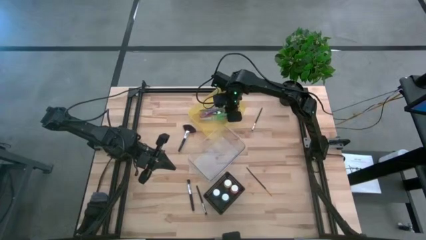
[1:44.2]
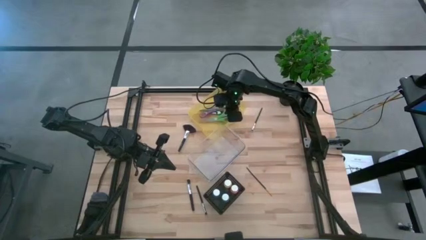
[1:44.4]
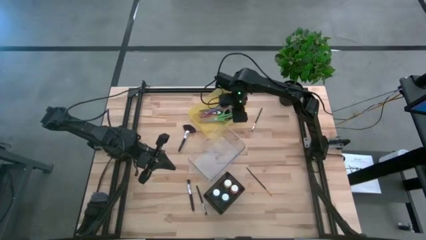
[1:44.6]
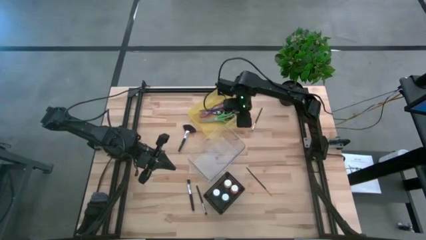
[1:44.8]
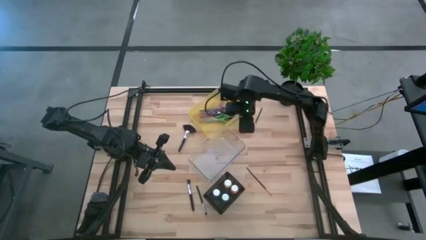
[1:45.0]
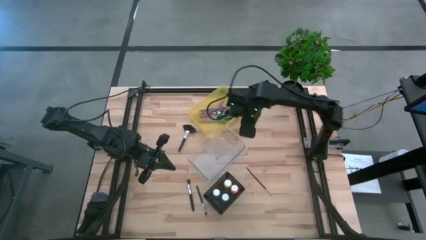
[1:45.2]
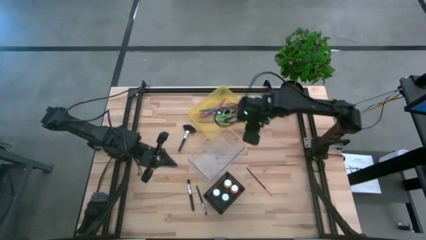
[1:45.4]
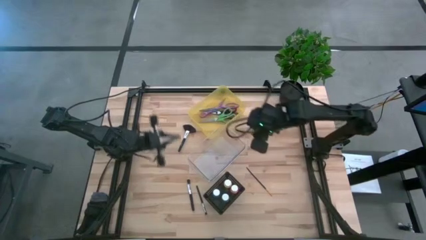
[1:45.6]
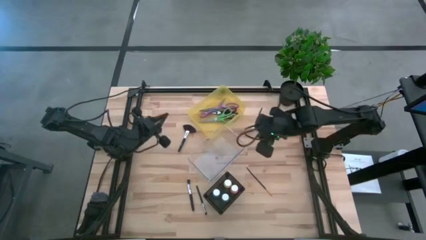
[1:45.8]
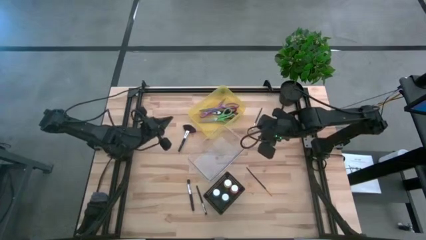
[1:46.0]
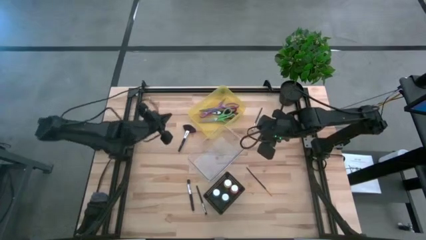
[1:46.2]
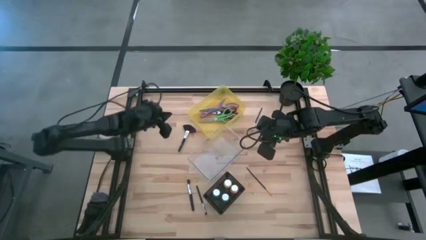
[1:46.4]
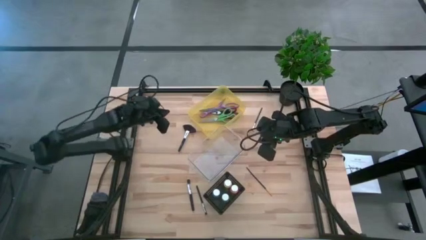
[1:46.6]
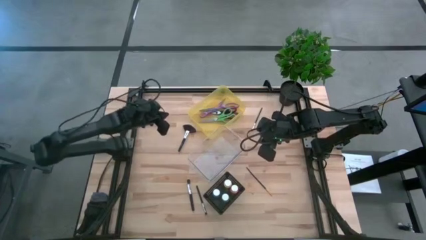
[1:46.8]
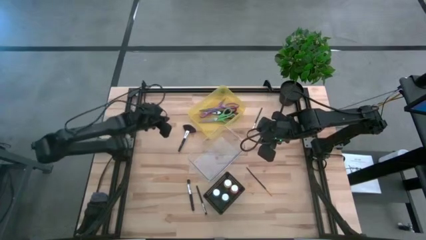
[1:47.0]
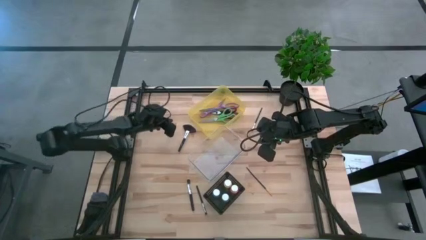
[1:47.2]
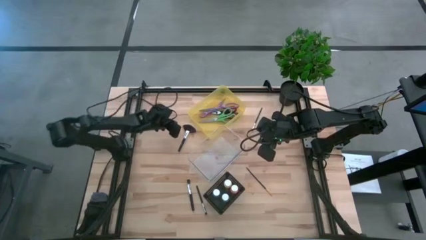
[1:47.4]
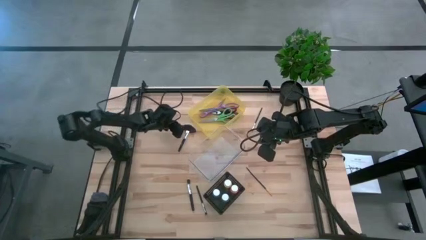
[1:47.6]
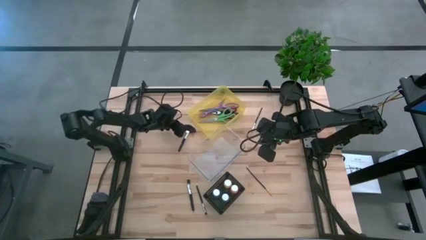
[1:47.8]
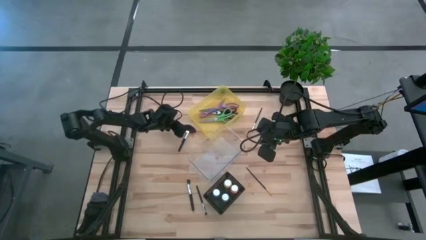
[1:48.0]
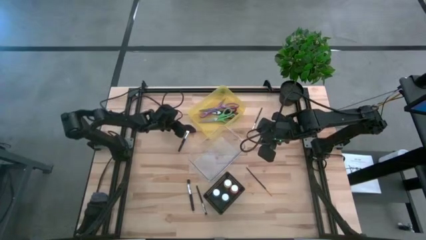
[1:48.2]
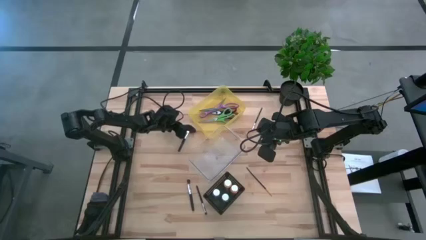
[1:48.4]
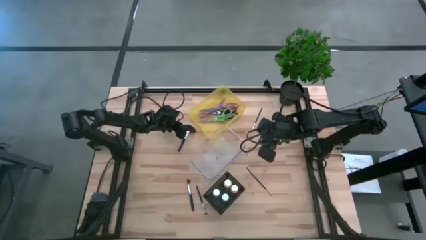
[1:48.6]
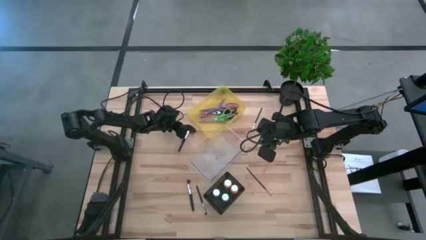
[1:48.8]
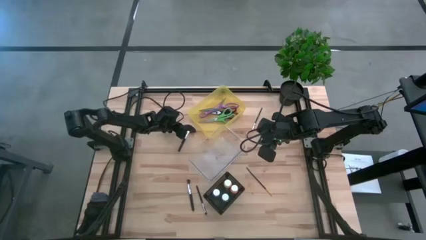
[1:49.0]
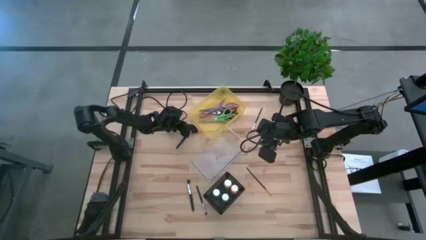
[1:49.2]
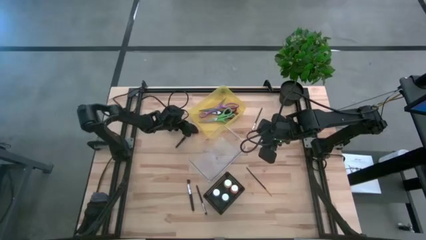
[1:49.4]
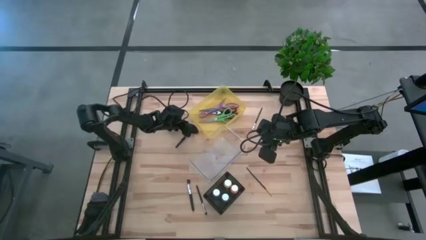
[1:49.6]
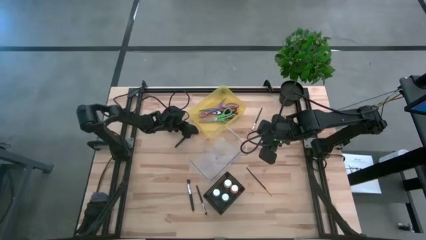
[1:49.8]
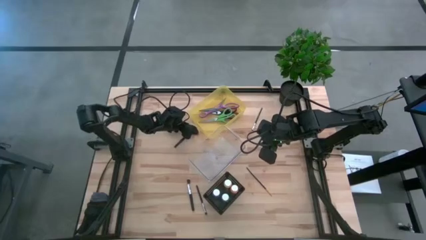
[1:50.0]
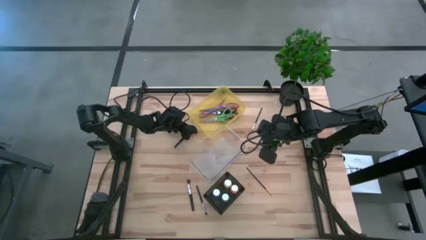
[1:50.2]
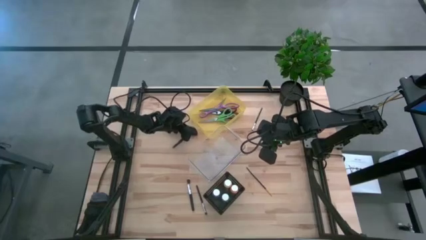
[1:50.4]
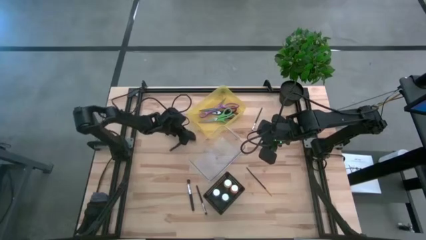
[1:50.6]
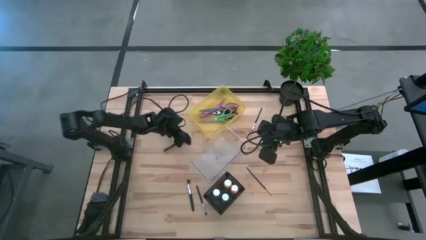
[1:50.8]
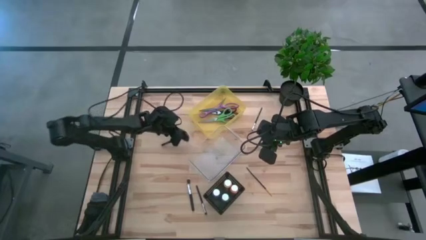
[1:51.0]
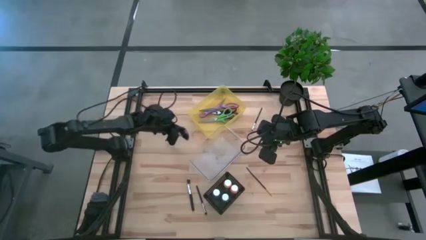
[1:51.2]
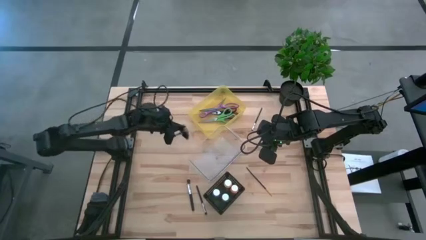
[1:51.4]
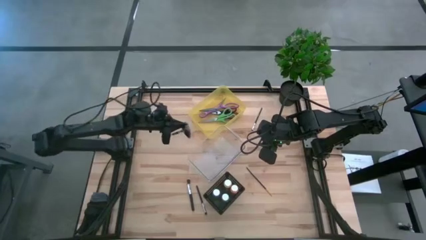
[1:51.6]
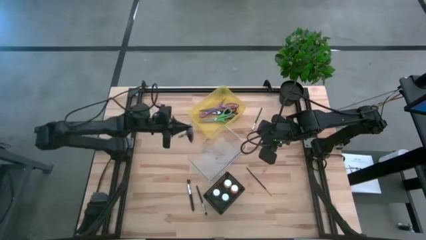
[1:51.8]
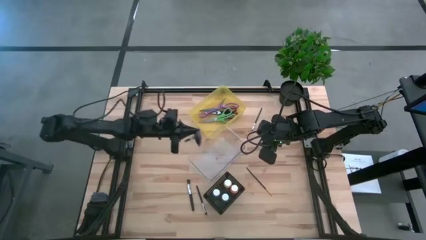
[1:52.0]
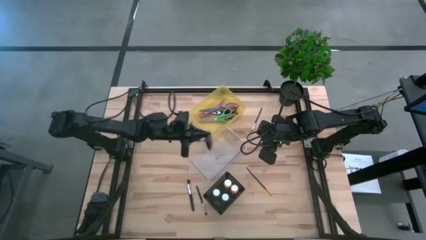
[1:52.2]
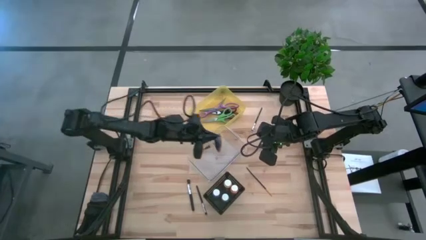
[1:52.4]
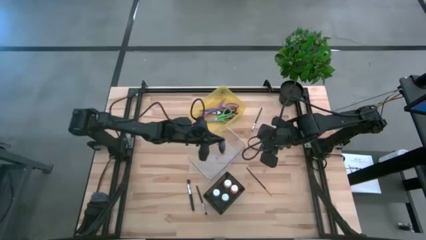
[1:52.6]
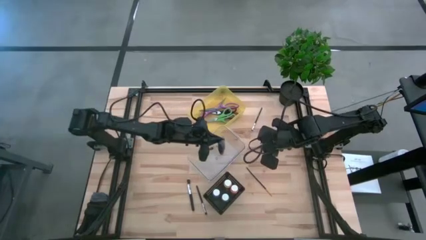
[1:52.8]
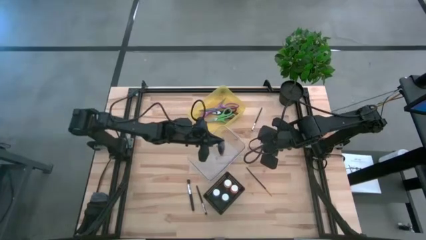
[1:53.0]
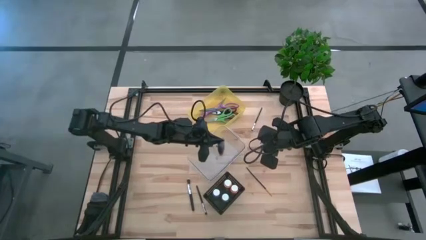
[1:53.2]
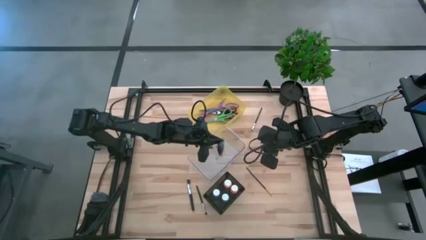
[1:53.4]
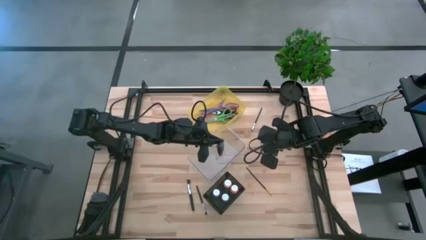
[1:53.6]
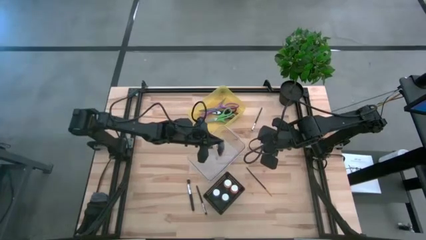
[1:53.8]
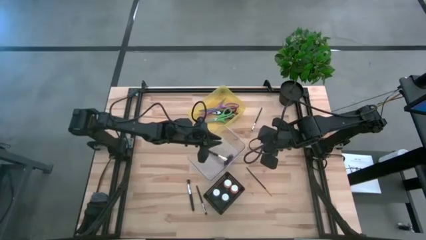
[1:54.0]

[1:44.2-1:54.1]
Task: Pick & Place Paint Supplies
Put the highlighter brush into the transparent bin

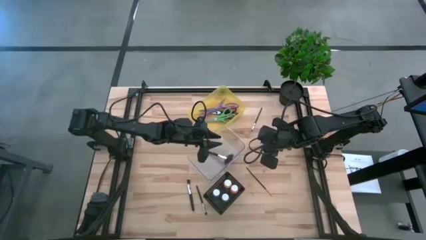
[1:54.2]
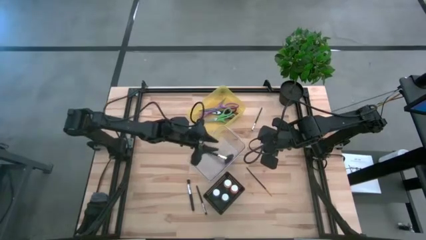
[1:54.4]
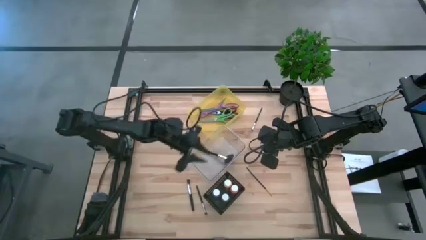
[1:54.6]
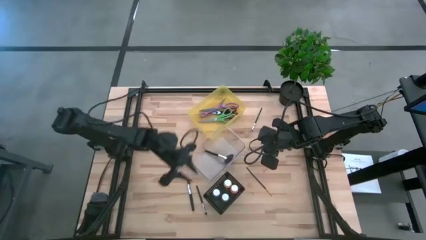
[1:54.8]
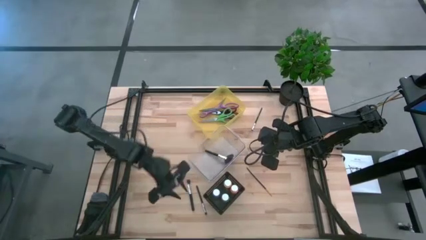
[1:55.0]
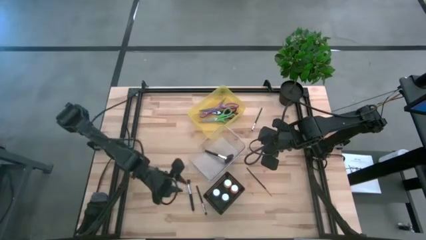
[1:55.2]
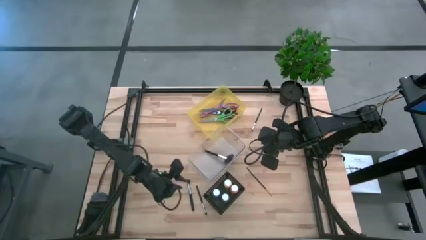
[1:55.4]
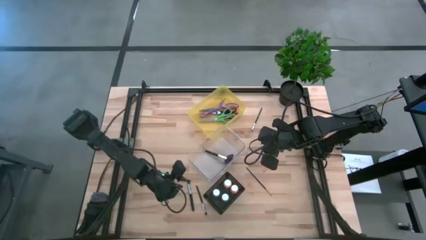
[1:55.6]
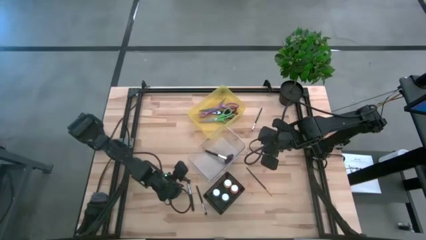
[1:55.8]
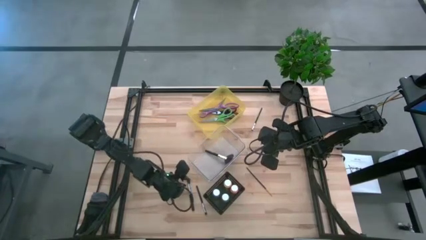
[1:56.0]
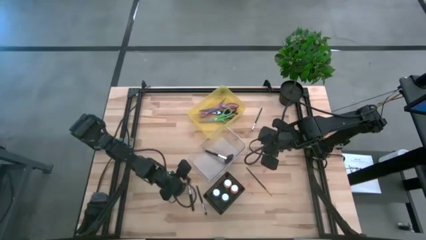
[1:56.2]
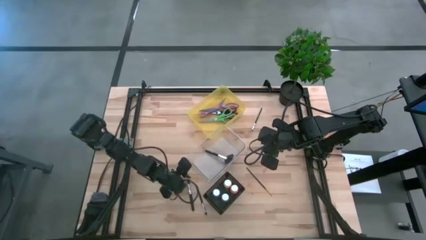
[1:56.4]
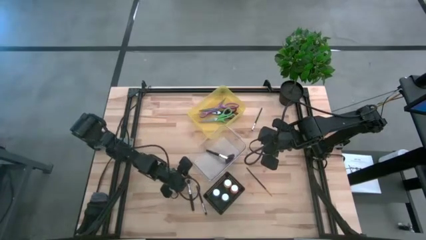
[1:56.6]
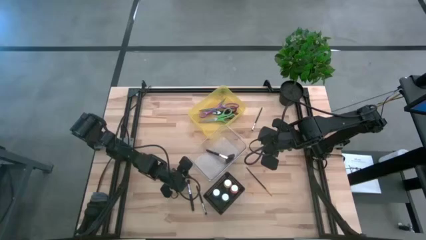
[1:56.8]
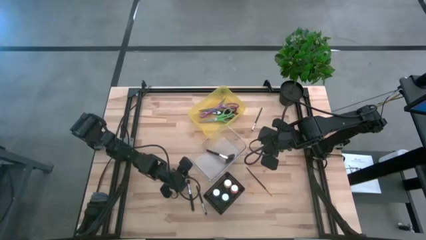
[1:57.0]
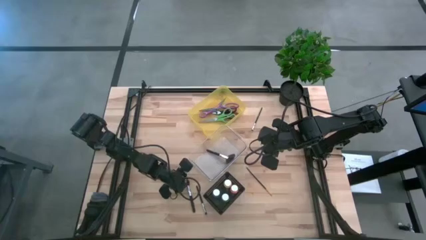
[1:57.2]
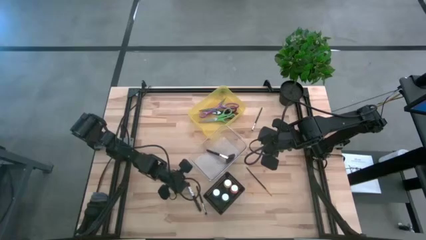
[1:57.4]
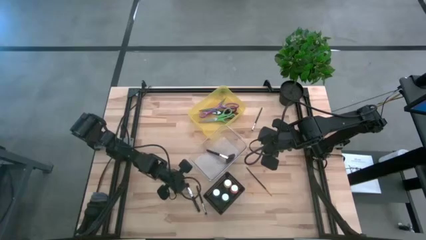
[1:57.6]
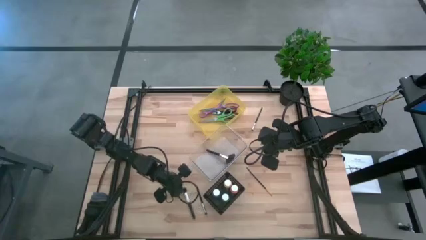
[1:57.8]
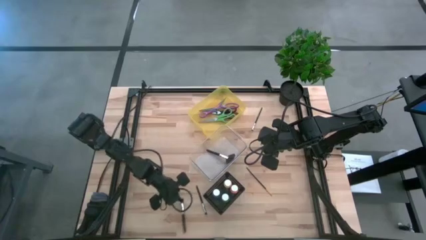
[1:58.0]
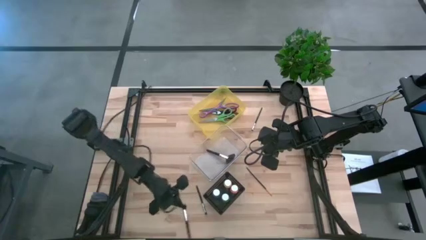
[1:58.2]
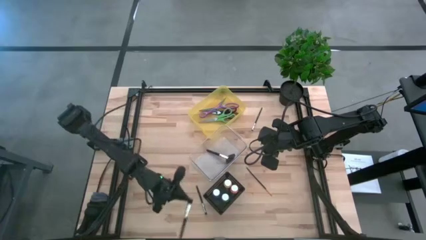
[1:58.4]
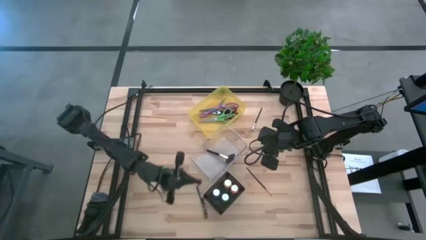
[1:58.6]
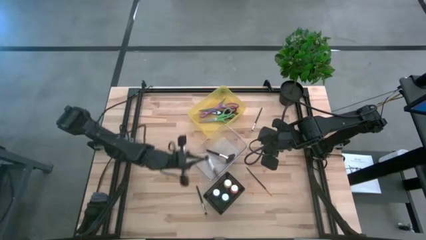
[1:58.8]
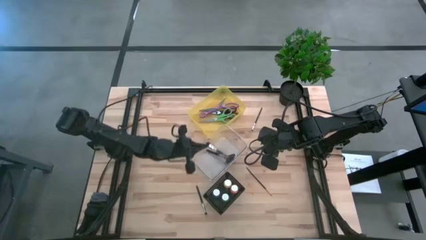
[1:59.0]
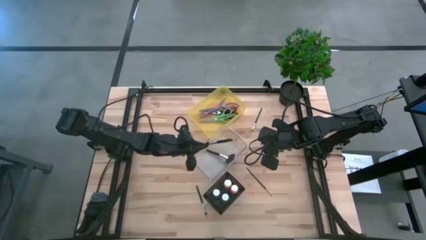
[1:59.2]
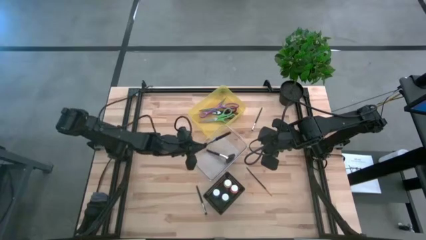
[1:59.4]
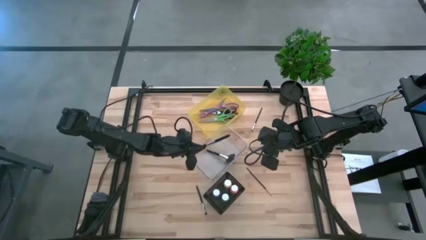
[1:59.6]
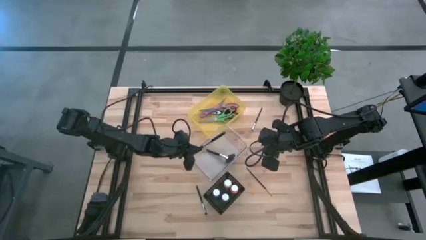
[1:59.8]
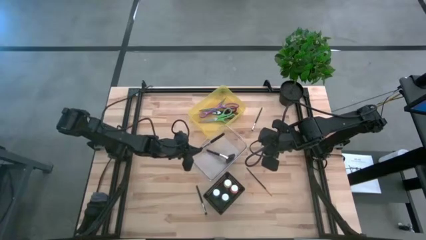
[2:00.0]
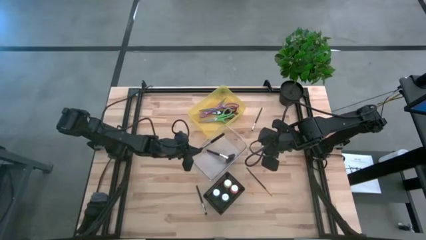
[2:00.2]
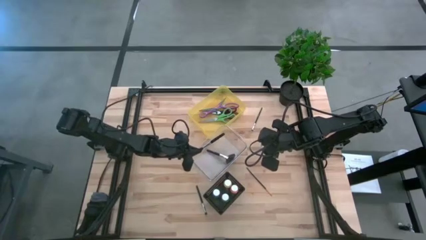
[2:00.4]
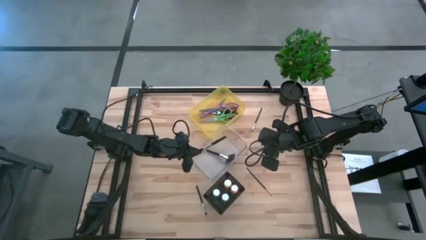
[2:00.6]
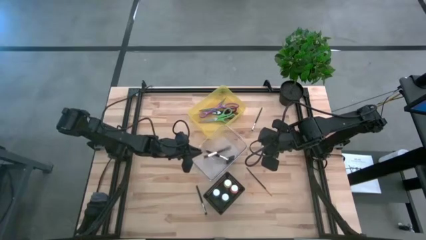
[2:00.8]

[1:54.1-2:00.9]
Put the foundation brush into the transparent bin
